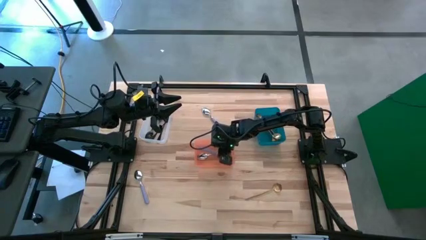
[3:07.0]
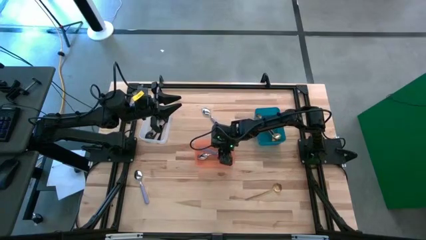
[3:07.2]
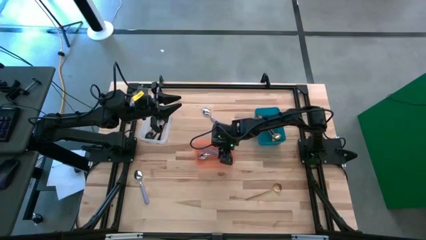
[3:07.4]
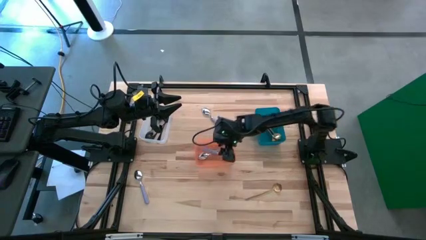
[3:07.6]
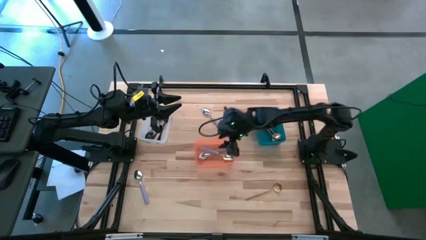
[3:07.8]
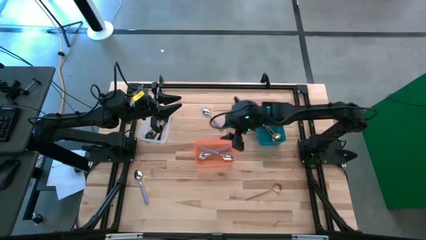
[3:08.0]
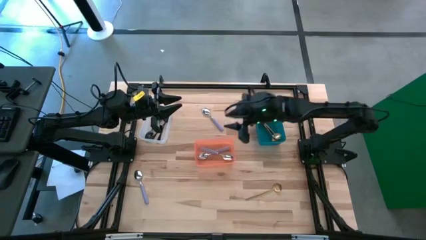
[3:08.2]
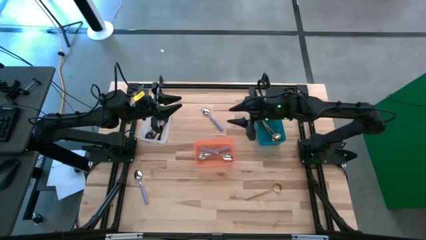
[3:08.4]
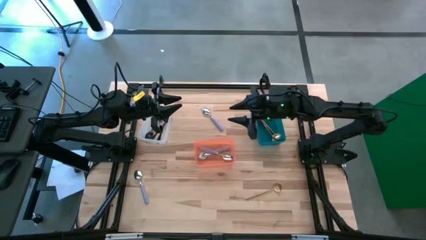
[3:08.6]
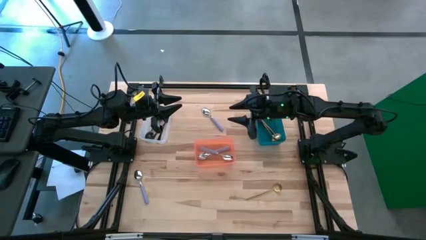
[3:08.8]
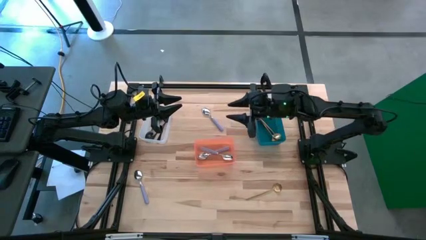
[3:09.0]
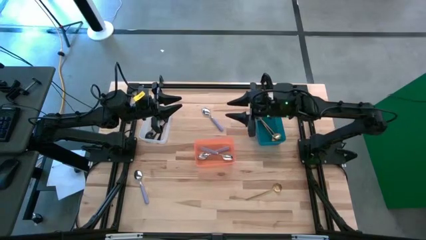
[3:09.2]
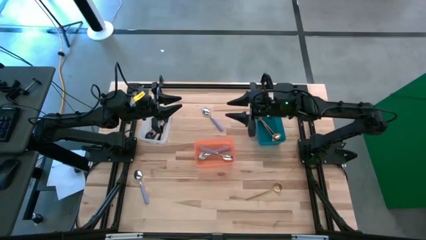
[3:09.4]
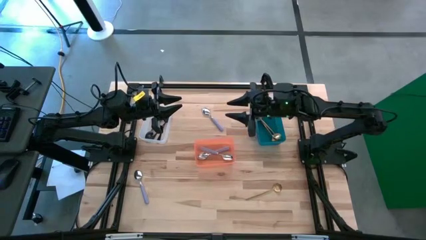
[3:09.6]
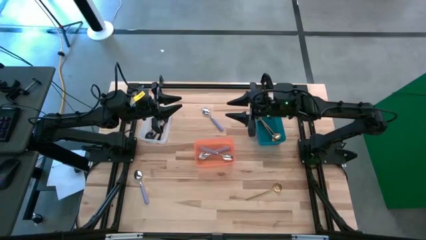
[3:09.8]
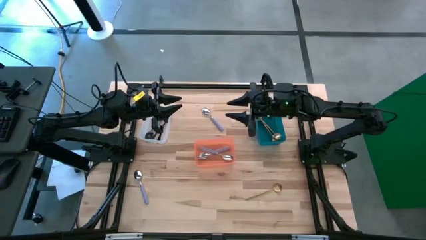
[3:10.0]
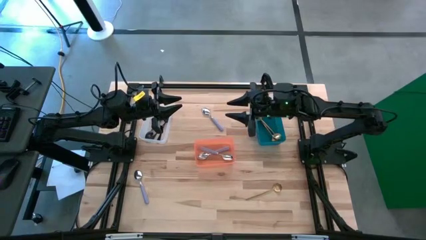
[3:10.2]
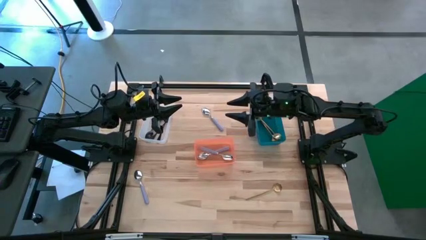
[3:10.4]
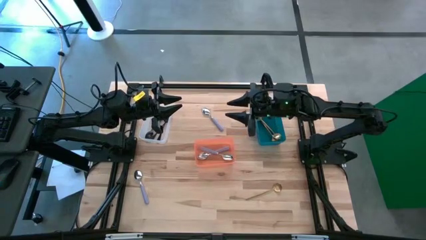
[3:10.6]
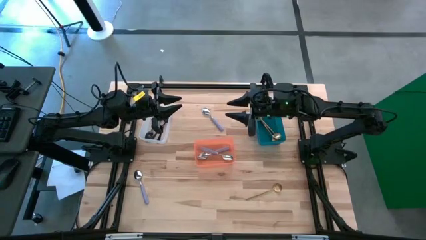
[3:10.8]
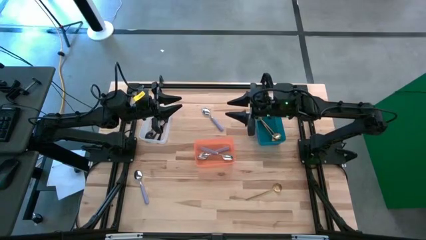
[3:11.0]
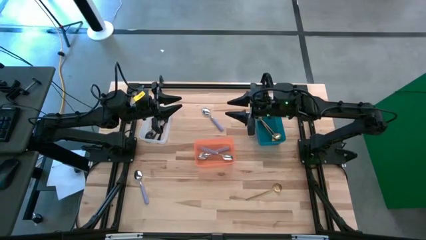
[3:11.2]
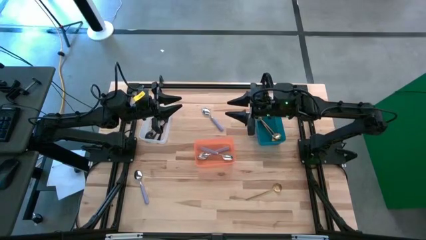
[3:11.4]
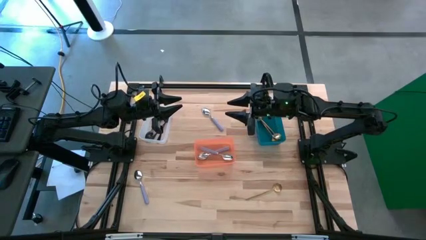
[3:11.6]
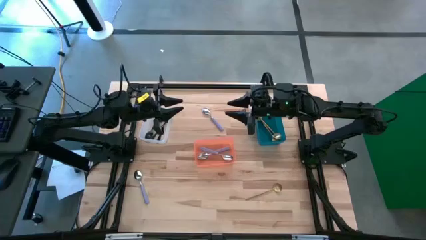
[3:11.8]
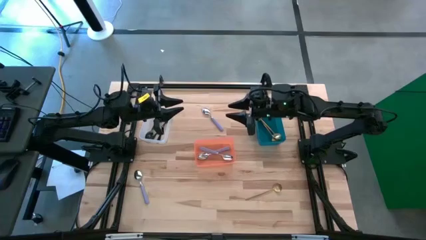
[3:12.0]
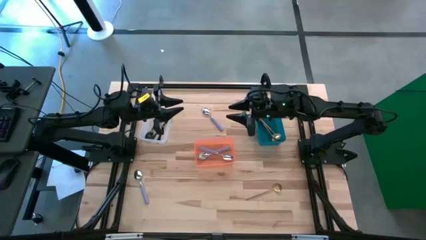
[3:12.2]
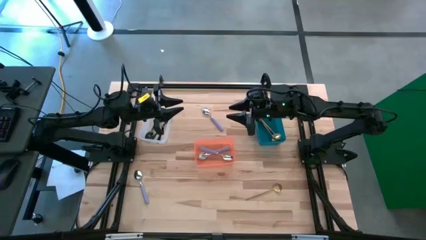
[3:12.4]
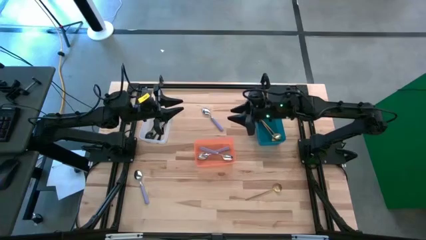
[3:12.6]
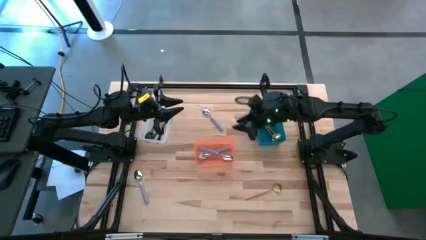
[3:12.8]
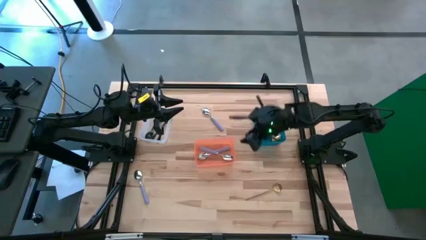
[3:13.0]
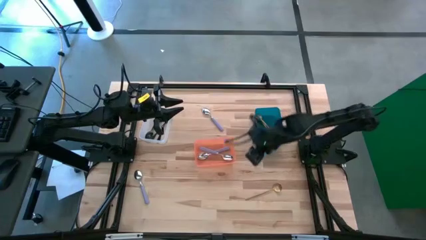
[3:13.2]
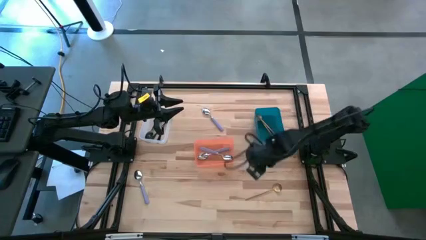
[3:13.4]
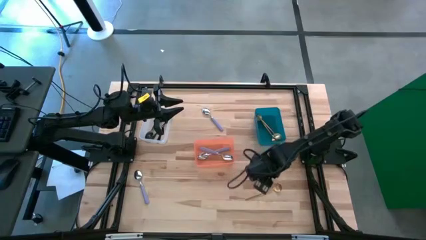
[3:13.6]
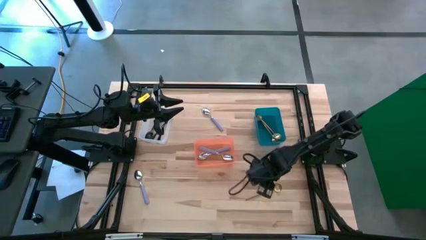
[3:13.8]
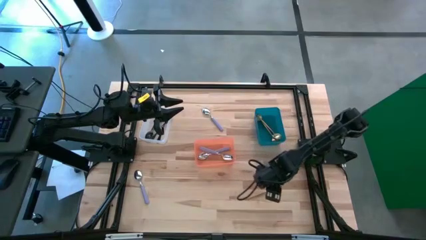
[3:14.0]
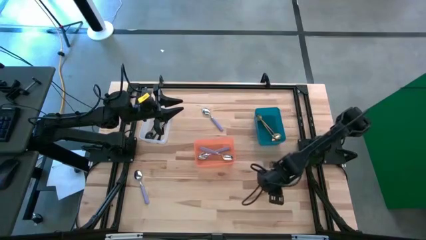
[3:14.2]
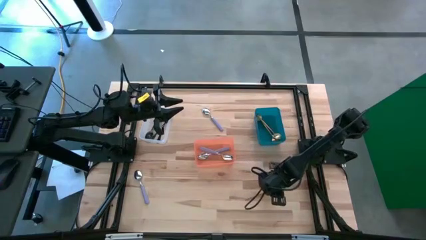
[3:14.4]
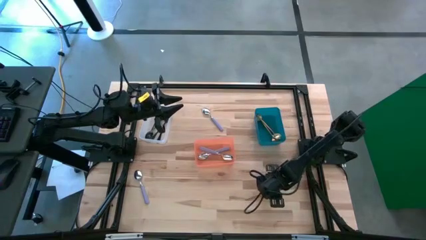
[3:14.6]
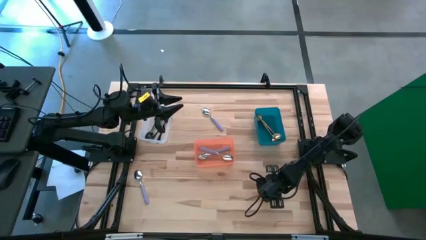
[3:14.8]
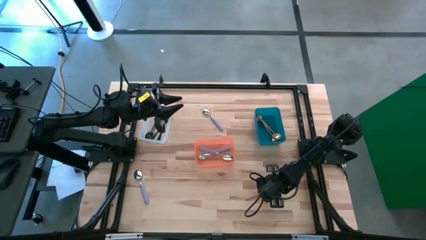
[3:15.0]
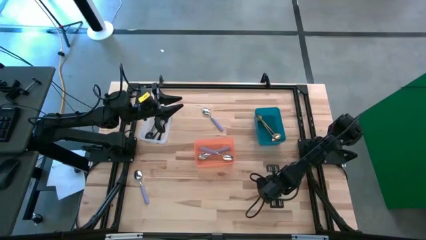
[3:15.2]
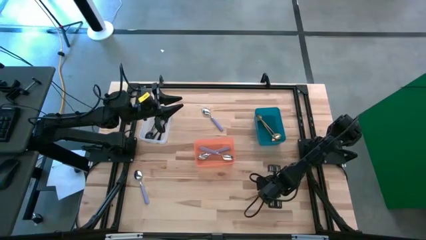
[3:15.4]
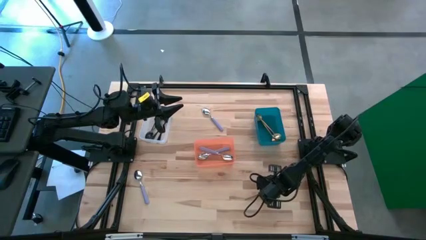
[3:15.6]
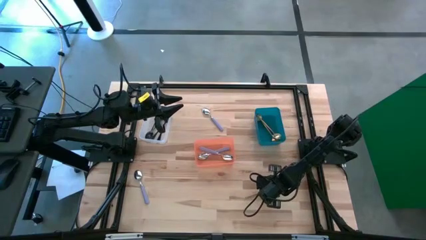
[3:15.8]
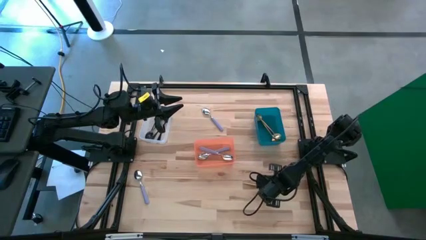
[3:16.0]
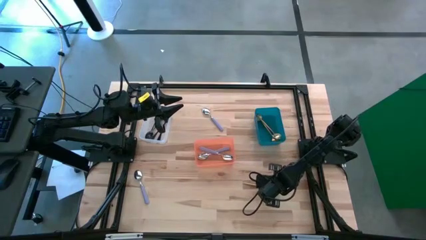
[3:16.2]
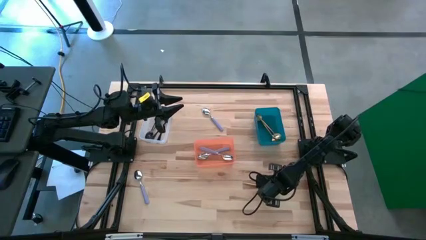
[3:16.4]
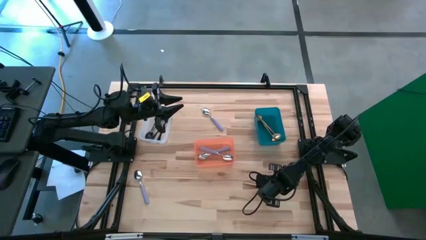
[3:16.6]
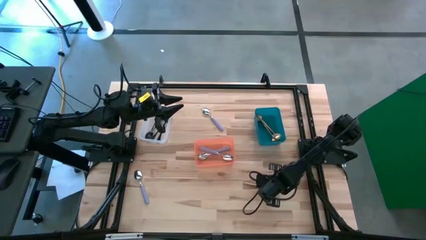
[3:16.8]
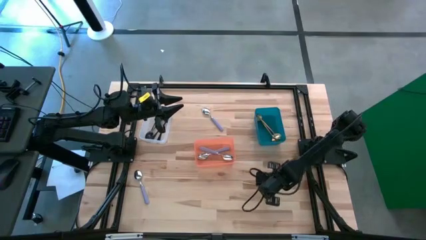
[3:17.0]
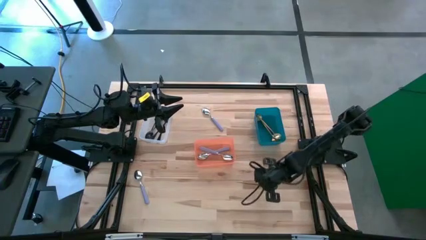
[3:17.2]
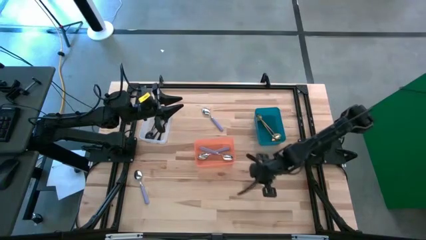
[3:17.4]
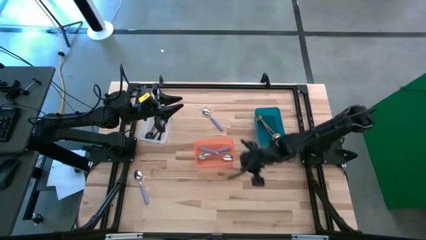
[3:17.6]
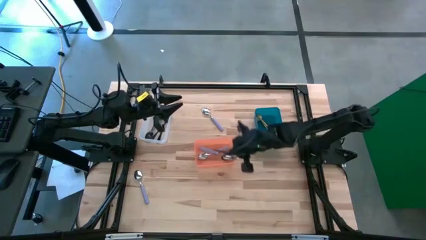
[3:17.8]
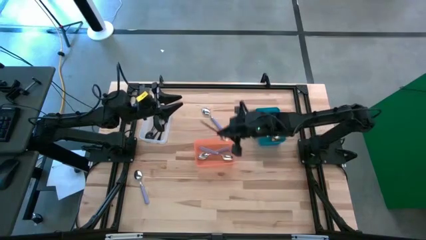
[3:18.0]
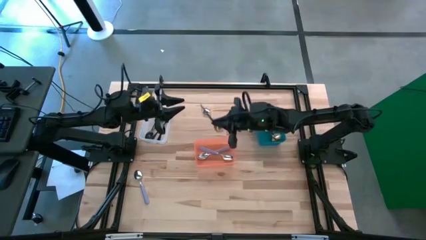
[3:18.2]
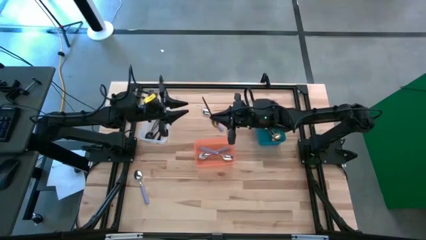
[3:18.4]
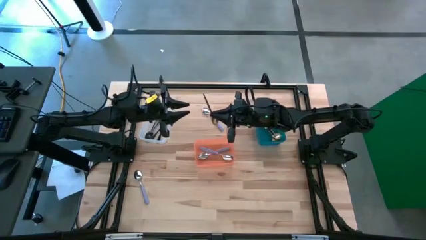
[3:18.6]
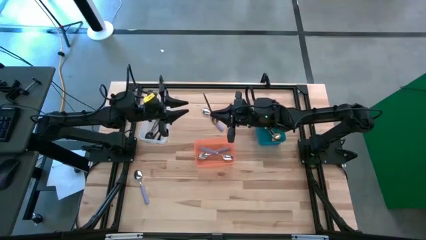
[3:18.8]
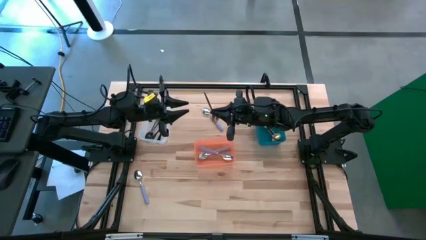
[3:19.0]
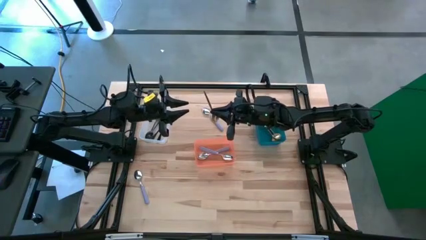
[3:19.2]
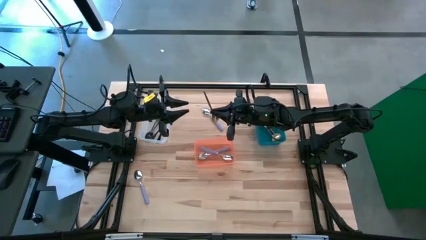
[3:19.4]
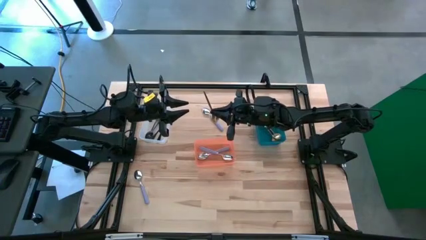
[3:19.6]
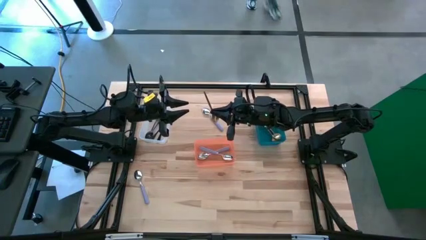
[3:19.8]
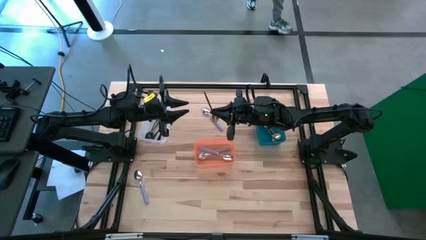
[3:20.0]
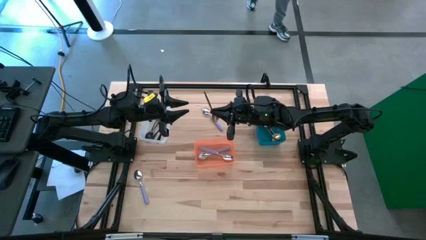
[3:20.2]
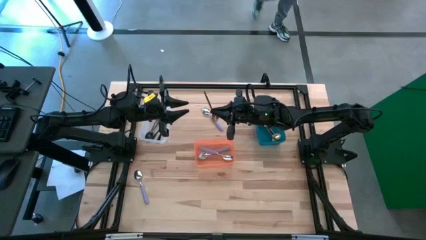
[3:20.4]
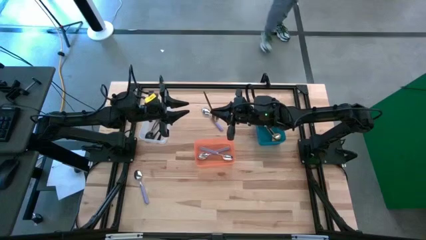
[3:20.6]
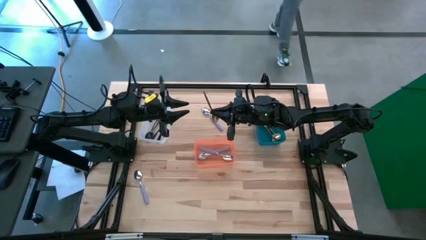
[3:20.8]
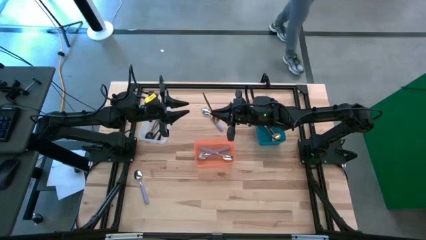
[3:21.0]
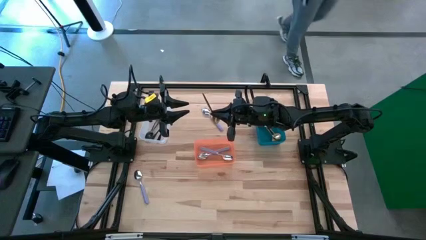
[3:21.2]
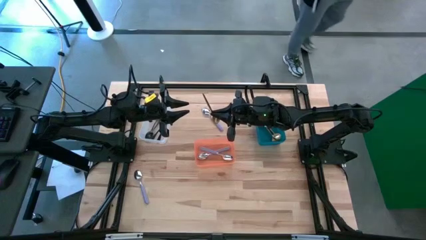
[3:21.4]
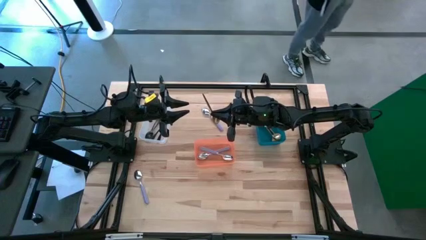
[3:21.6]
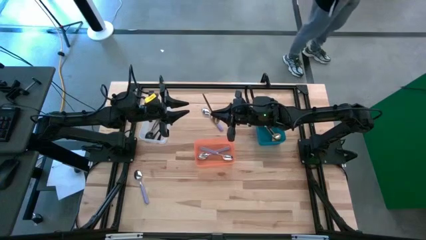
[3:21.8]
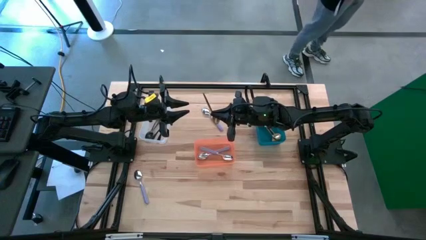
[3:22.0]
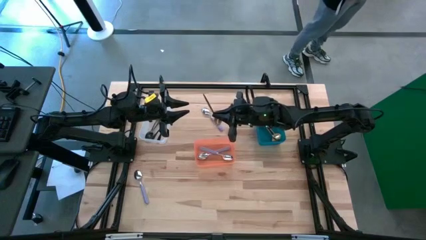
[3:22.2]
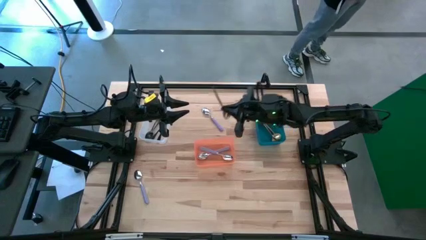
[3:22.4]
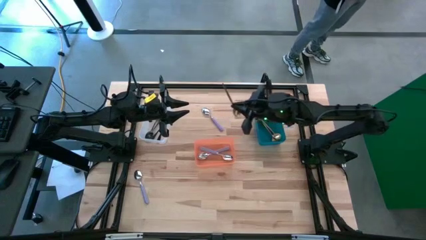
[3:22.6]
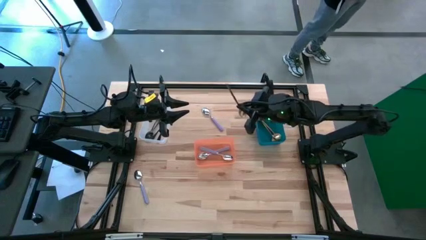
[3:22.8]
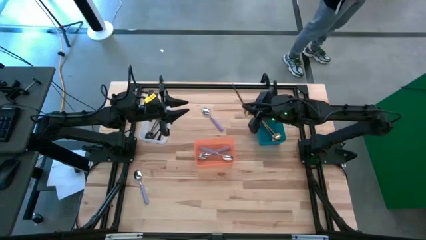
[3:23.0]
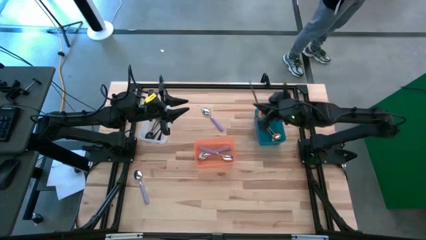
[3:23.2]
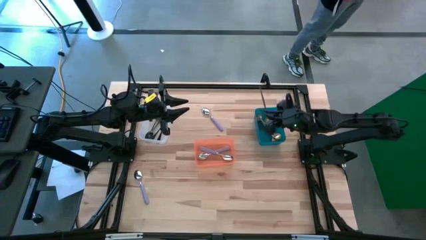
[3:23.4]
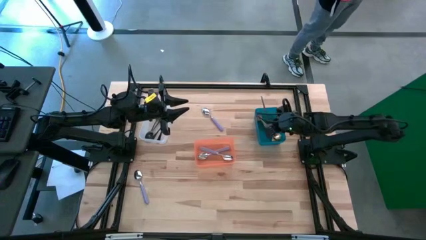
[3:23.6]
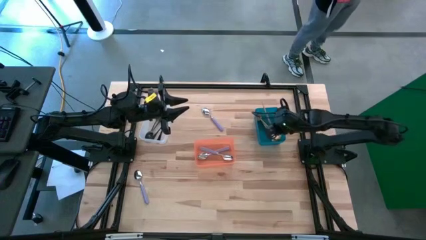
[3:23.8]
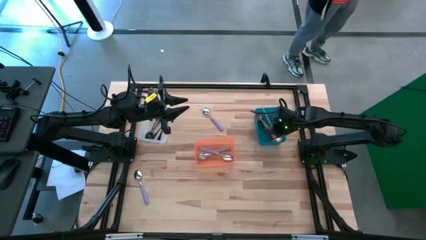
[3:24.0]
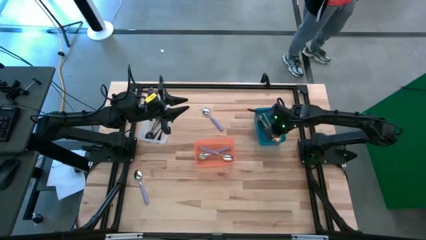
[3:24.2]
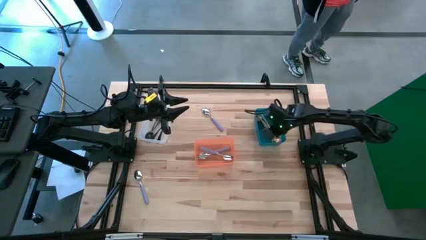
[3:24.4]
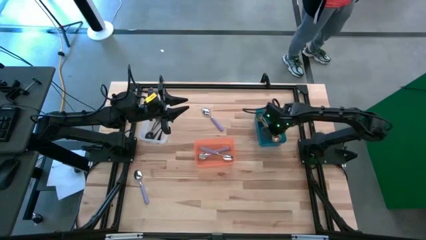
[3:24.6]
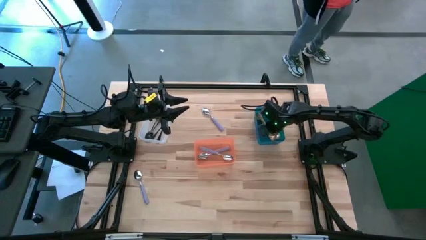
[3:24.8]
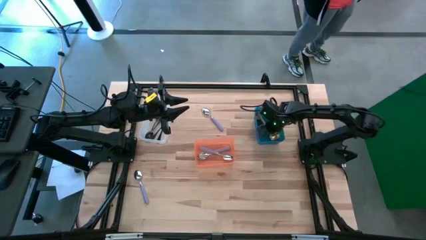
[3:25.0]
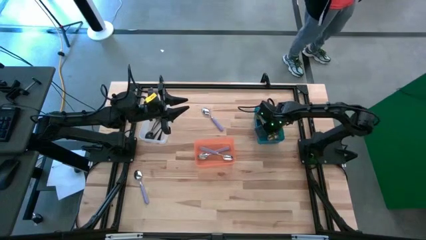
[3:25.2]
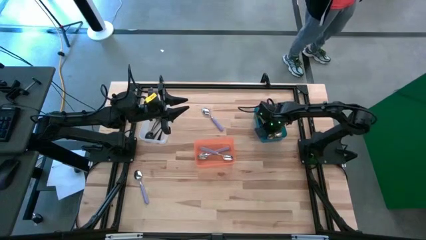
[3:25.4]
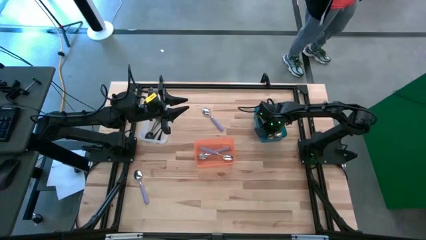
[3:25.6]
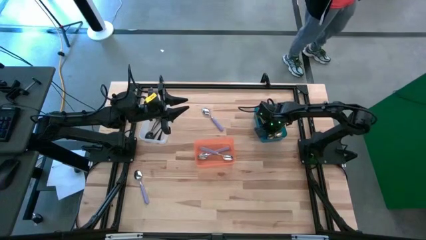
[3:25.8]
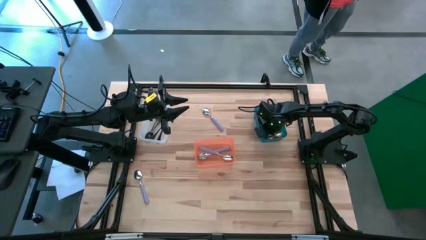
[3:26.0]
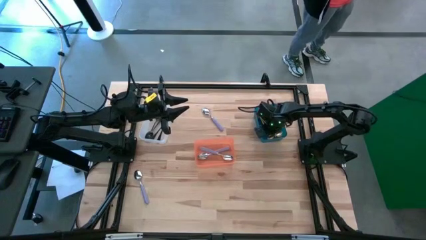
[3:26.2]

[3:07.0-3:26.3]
Task: Sort silverware by color (type)
Put the gold spoon into the blue bin
